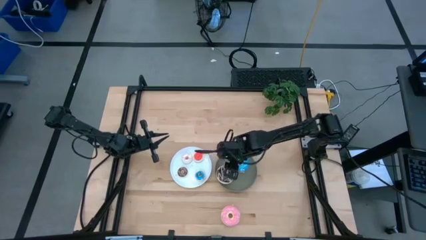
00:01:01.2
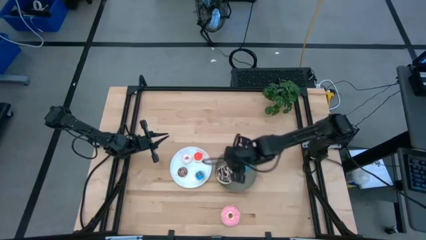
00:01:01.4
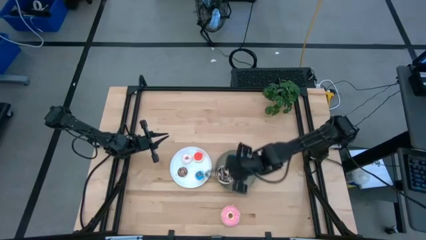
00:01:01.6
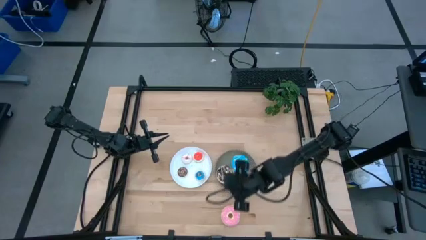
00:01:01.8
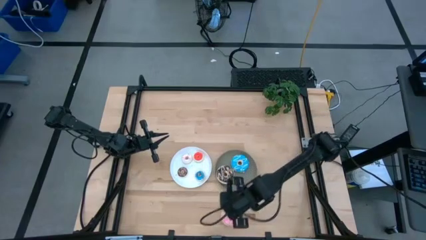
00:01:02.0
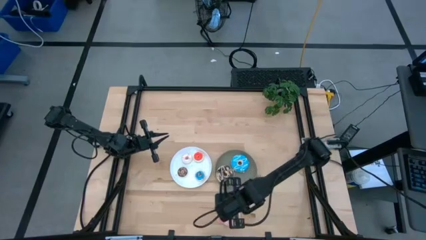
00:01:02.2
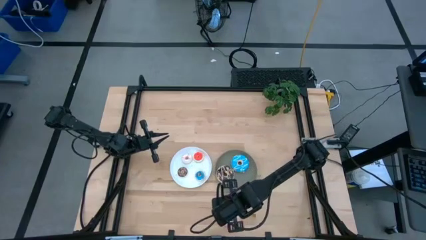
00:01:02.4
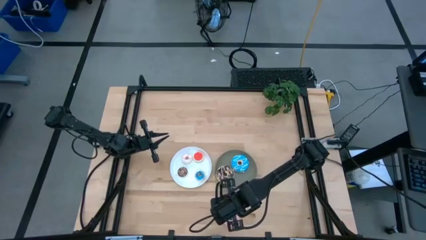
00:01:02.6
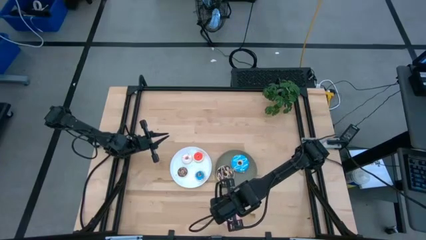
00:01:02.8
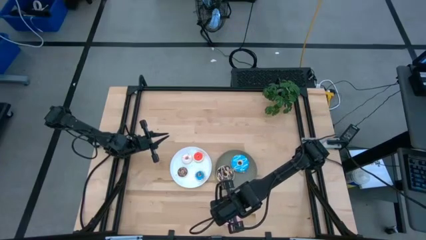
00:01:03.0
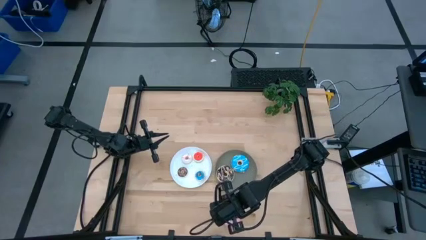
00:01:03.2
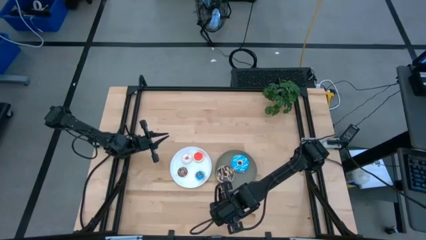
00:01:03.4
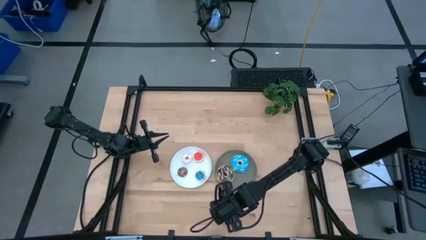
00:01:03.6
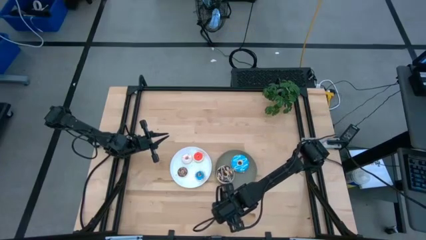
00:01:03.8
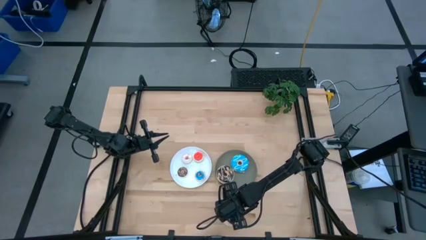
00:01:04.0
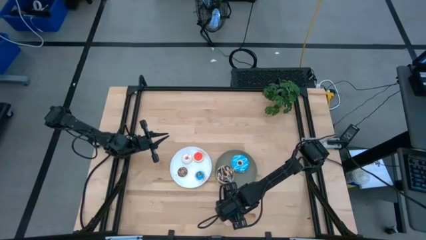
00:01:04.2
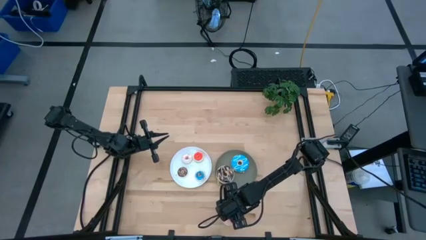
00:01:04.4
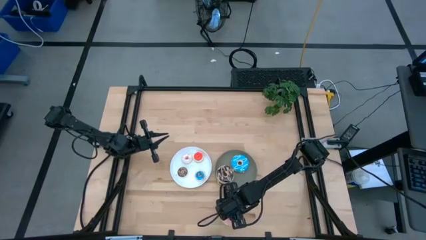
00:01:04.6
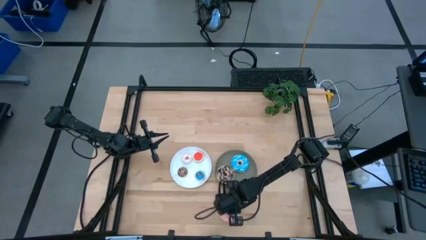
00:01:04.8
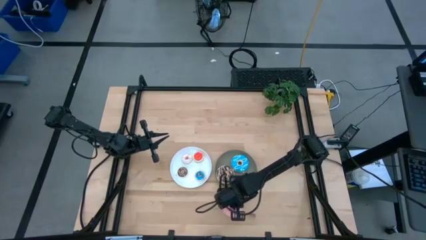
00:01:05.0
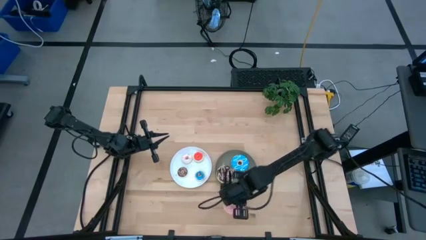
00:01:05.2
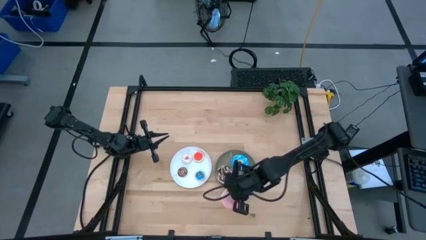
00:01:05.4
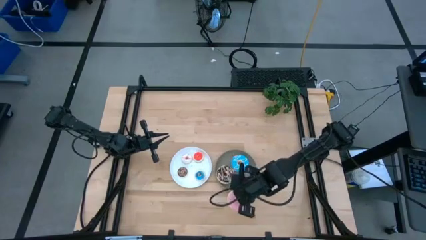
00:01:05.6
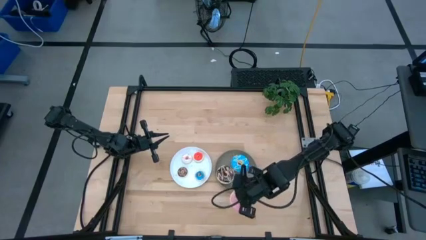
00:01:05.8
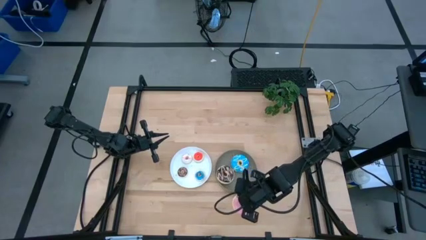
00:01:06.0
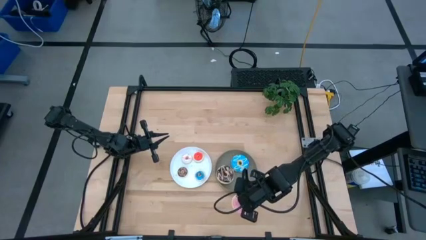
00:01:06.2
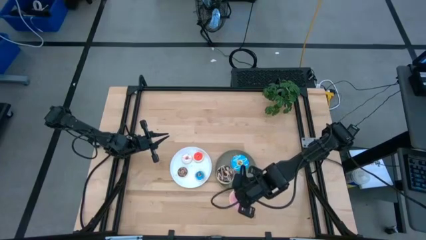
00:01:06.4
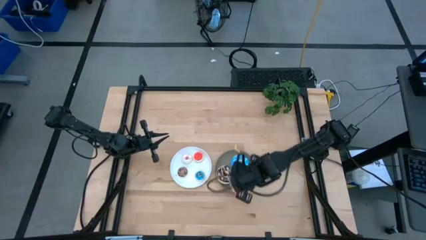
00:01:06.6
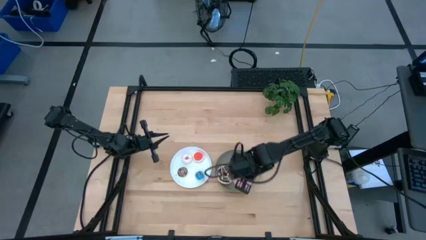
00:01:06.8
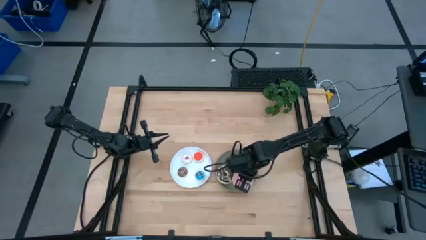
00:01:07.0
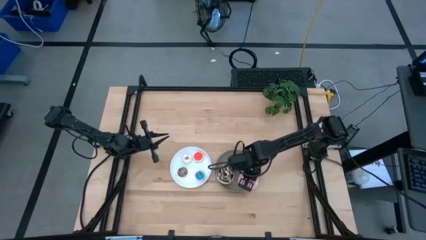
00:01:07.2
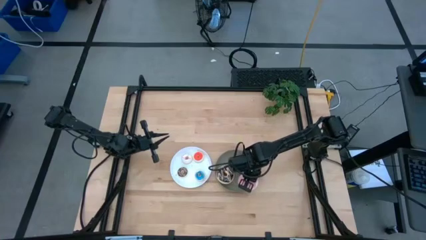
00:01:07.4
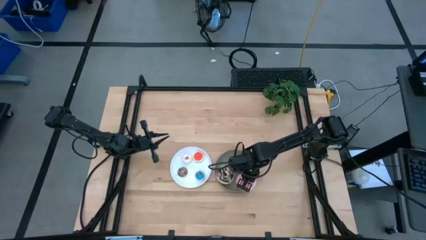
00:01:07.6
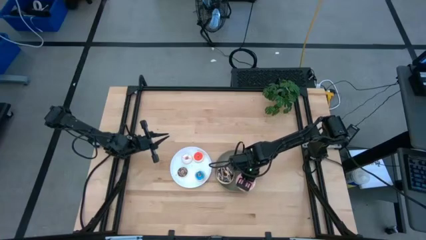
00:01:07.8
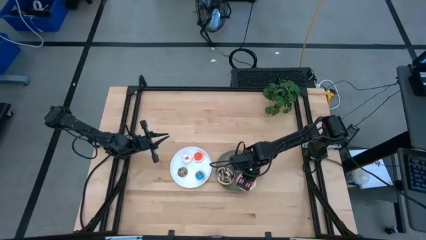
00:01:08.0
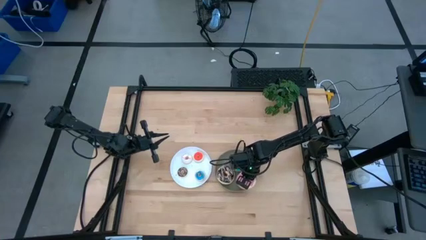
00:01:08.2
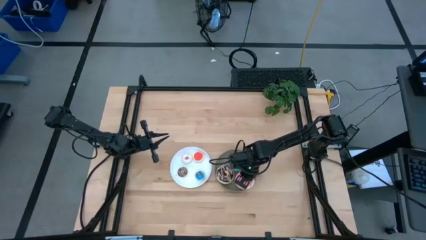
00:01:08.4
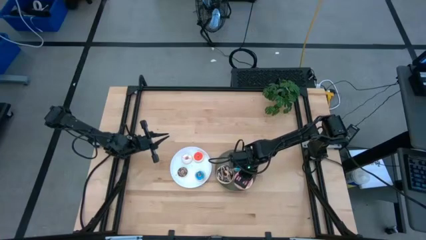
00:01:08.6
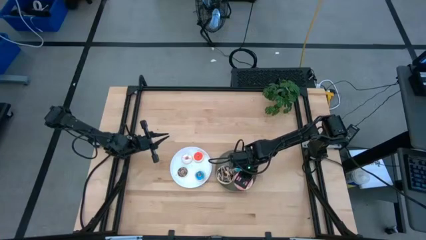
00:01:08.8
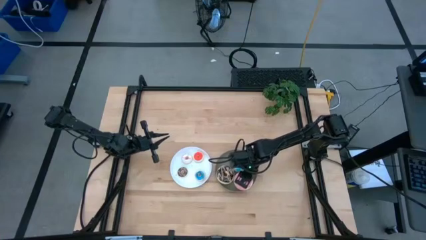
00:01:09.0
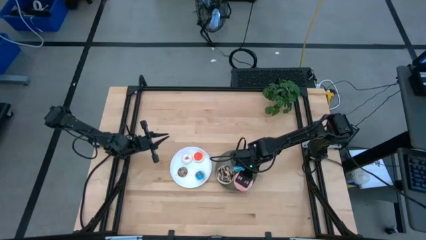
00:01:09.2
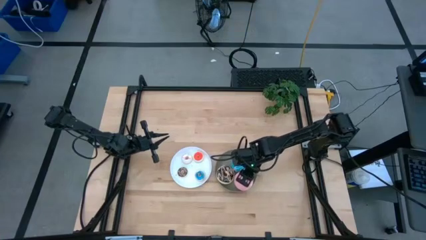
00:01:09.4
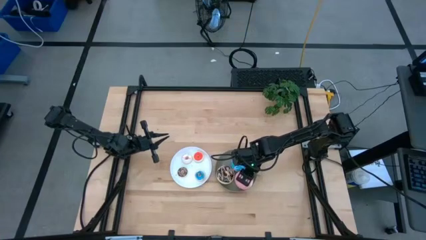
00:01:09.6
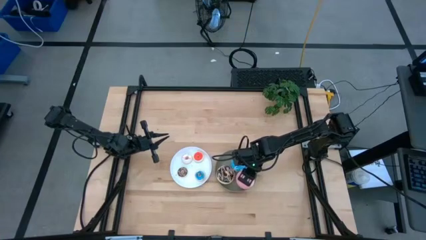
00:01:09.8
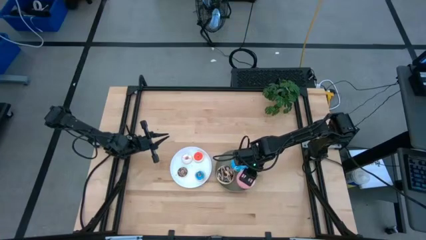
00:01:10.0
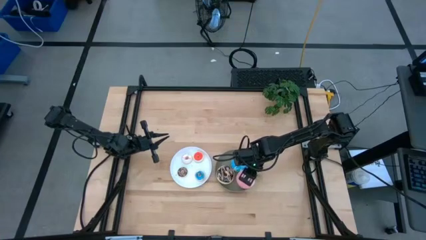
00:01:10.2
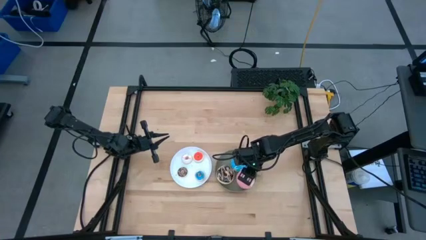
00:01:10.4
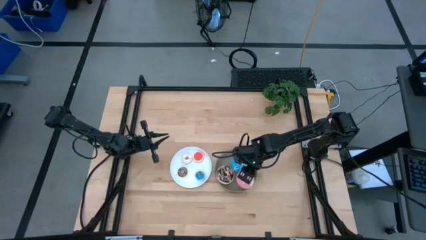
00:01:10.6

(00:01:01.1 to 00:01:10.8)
Task: Pick & Place donuts
Put the large pink donut on the gray plate

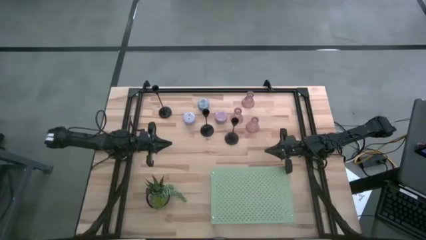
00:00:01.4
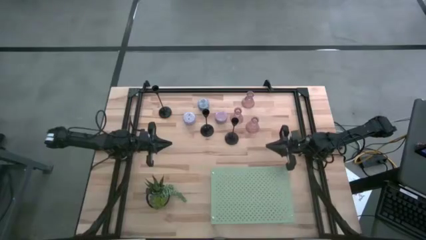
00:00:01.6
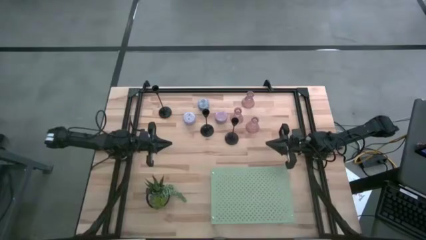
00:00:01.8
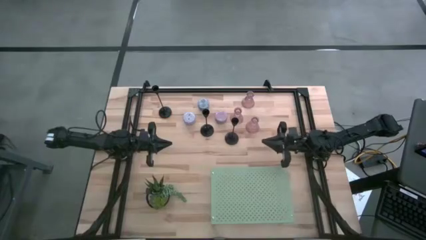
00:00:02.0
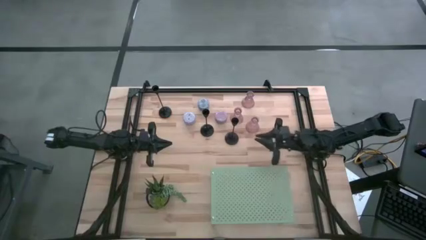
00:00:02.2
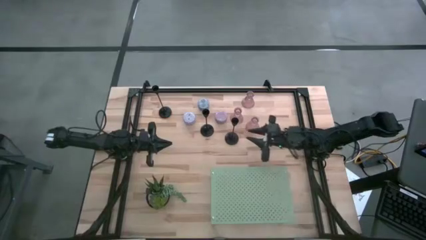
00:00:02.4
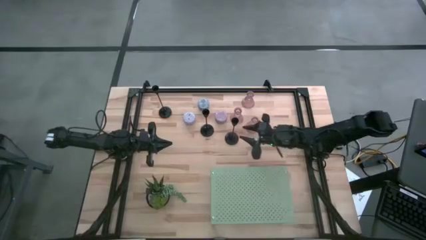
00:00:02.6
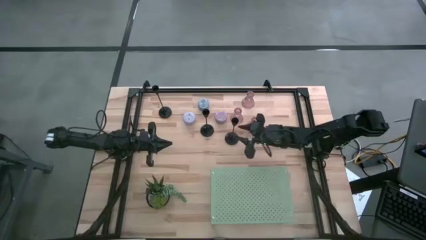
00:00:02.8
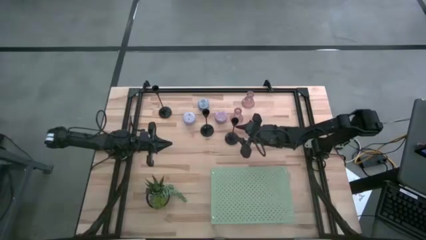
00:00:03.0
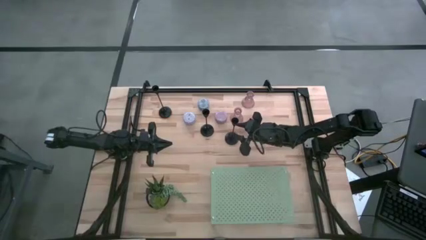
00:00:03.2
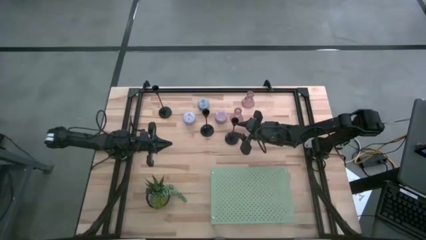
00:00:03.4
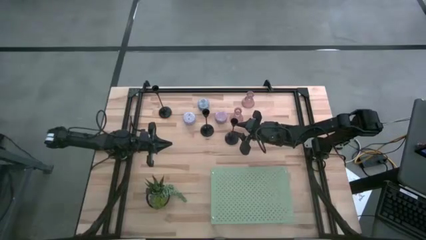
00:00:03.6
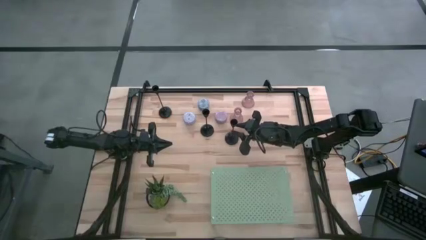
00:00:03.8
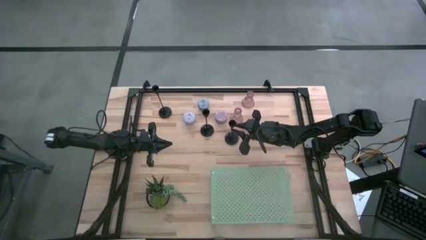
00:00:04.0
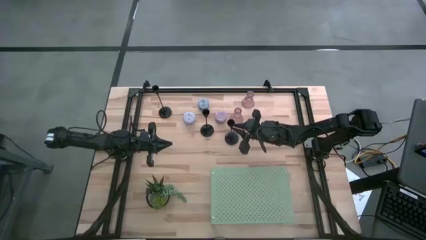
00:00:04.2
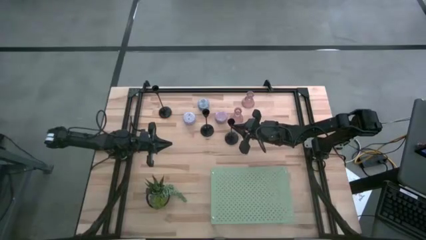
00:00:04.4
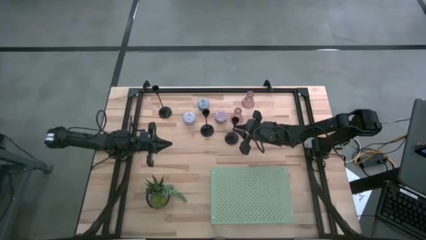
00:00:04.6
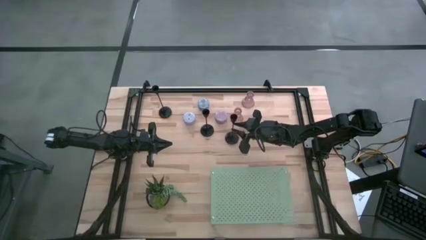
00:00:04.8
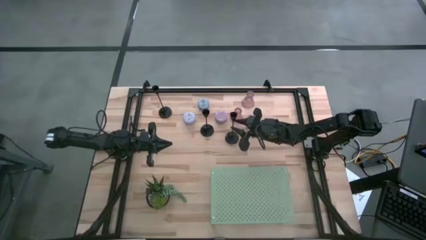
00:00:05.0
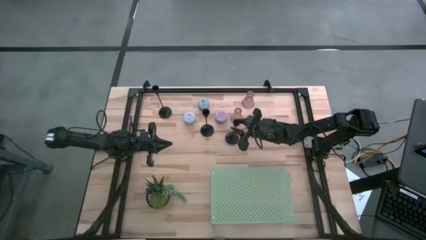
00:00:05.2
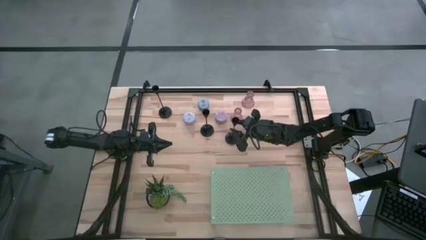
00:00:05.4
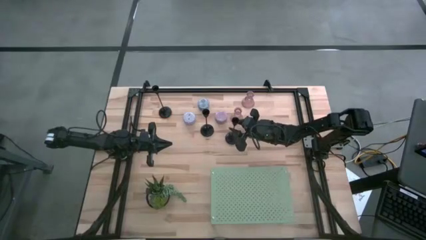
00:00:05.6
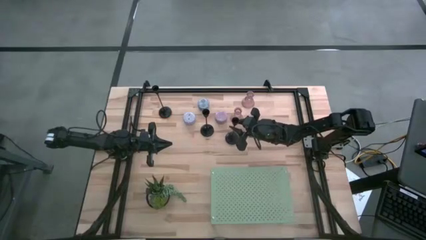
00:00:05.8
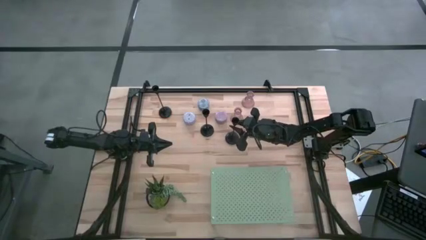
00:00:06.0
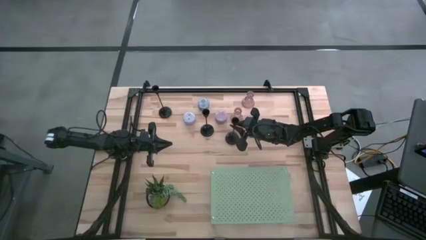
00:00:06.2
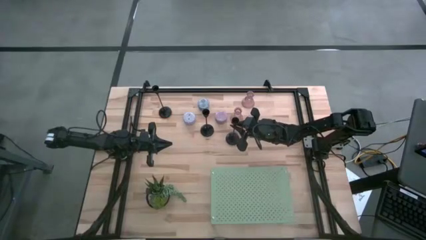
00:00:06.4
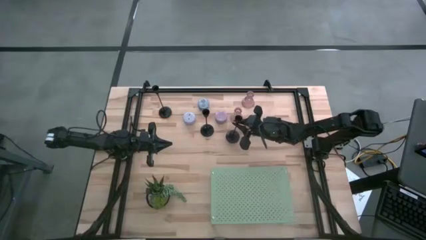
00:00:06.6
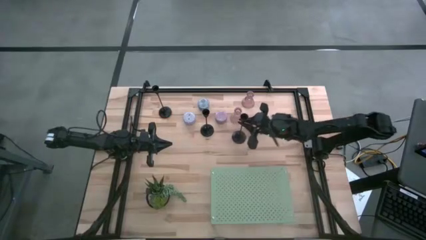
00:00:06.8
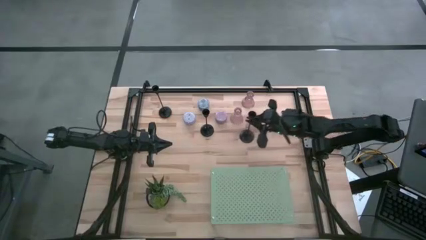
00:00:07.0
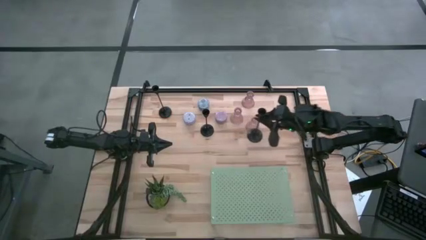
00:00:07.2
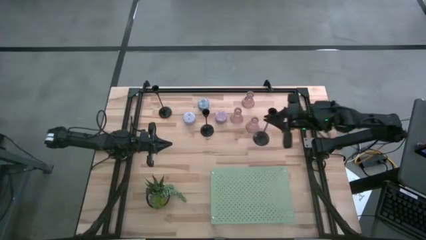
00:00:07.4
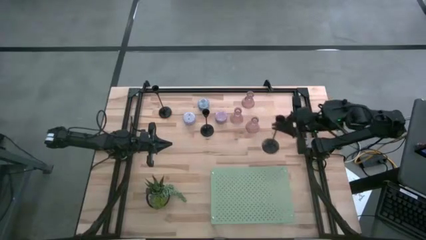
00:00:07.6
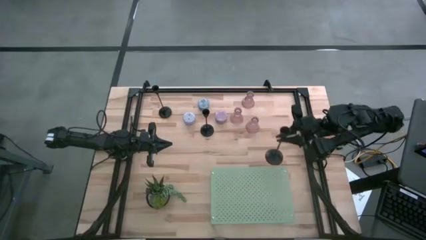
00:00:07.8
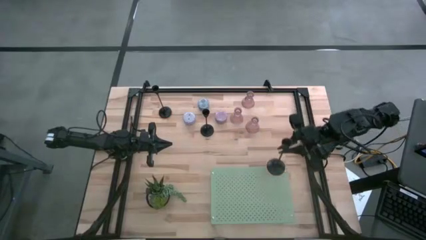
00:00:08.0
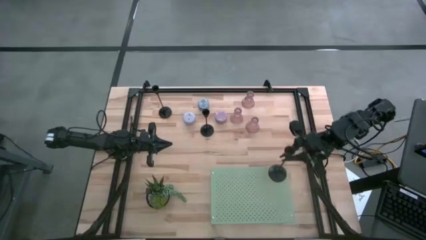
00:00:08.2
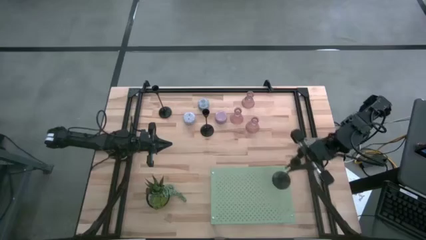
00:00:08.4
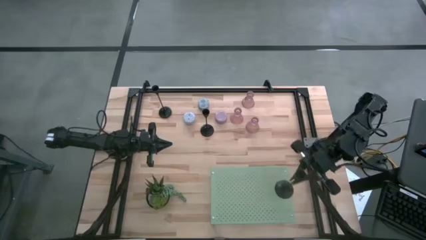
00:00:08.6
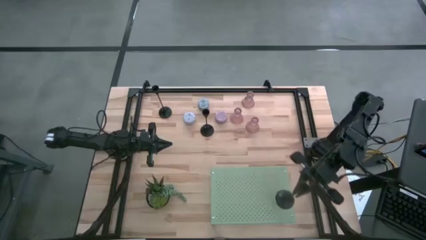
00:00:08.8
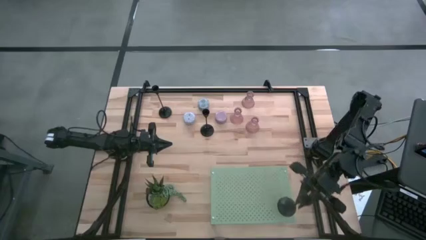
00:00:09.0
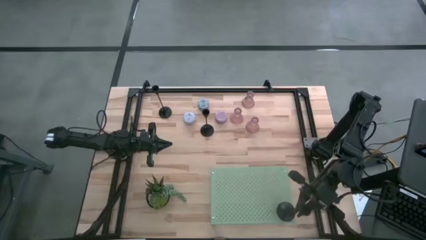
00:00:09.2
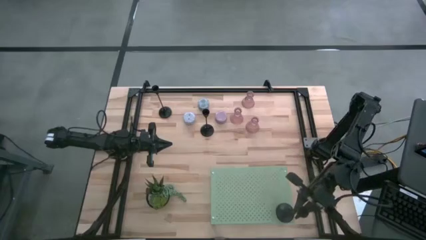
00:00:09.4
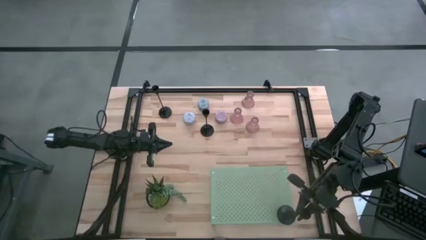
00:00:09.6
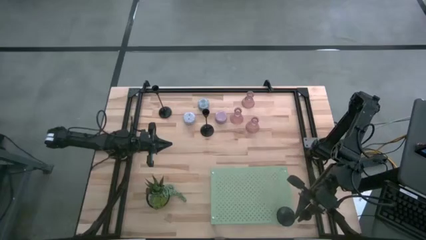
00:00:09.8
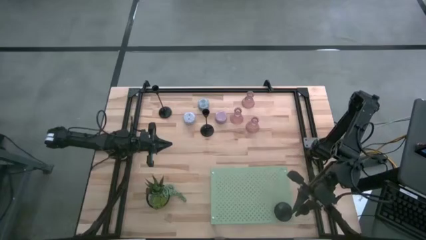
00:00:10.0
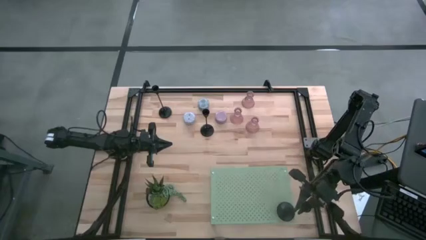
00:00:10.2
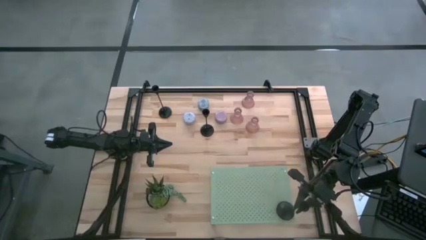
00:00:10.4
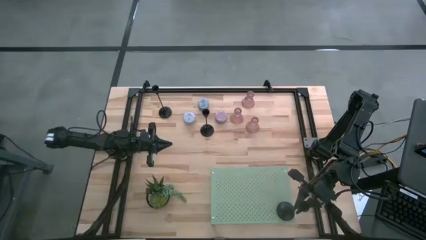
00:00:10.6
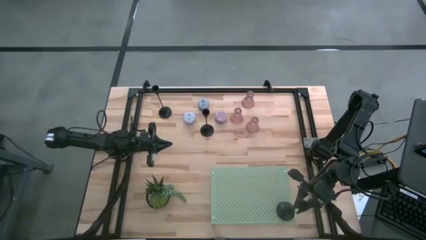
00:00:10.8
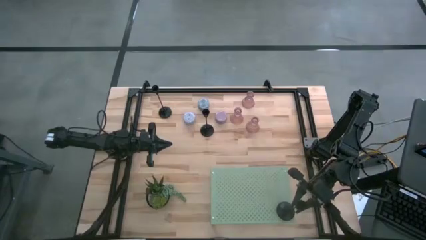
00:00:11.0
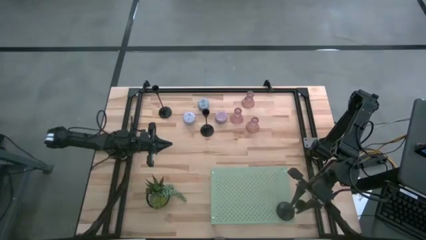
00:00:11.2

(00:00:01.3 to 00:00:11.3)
Task: Pick & Place candle stick holders
Put the bottom right black candle holder on the shelf
